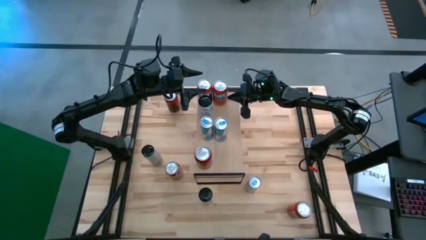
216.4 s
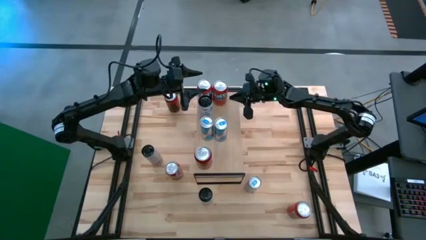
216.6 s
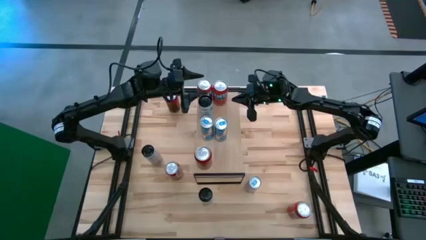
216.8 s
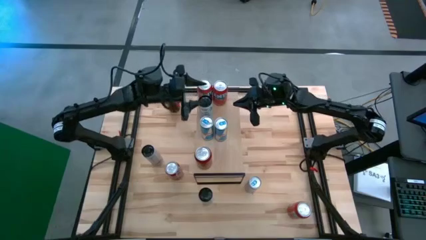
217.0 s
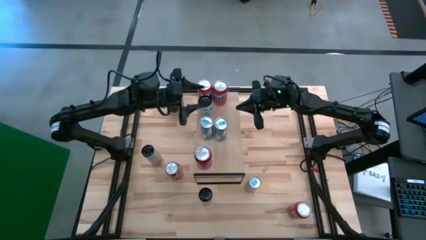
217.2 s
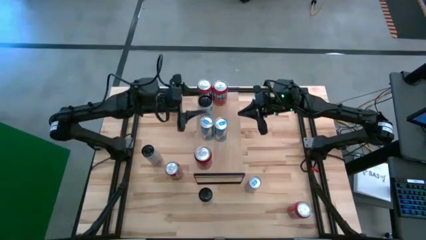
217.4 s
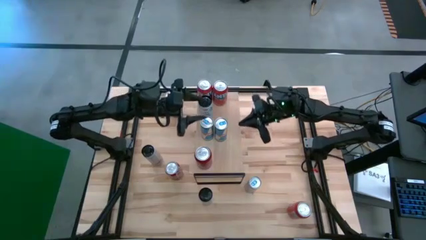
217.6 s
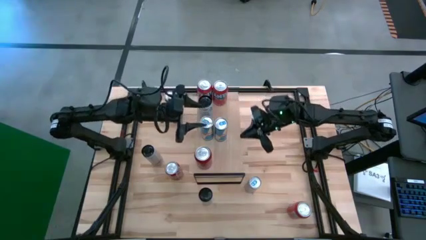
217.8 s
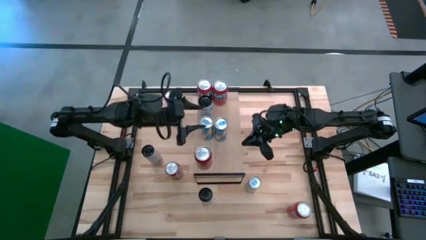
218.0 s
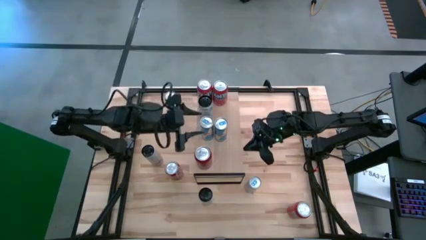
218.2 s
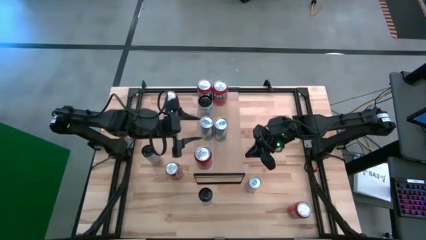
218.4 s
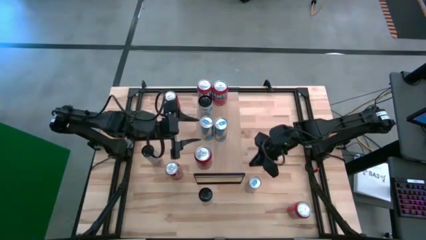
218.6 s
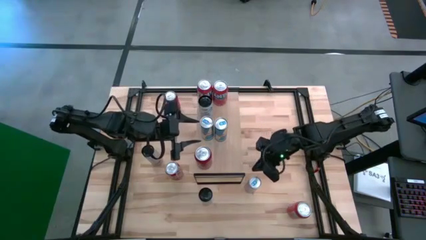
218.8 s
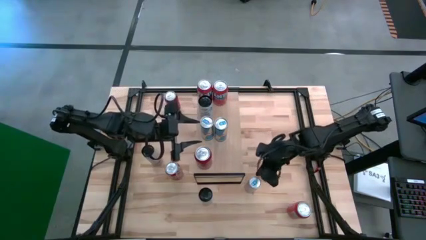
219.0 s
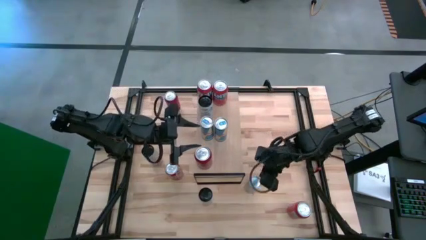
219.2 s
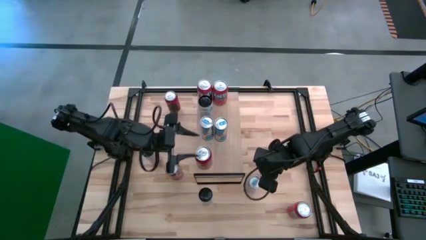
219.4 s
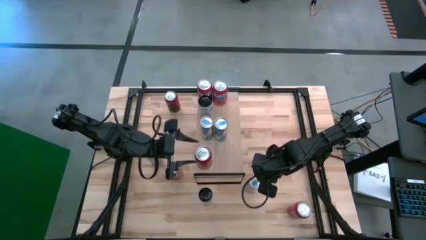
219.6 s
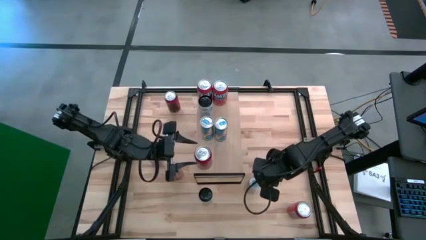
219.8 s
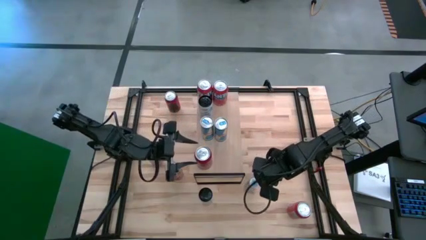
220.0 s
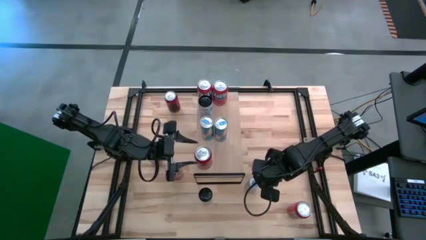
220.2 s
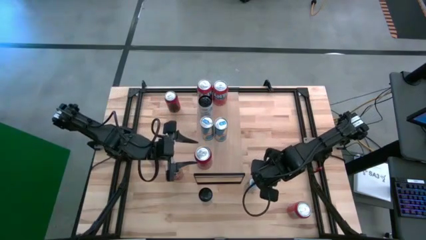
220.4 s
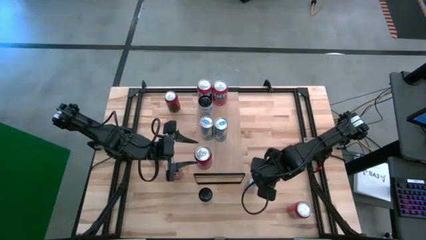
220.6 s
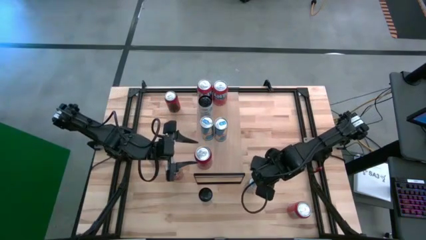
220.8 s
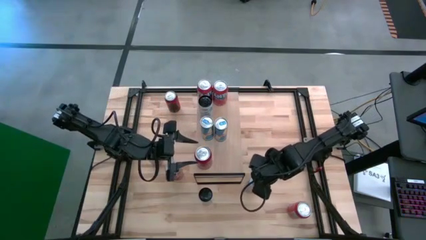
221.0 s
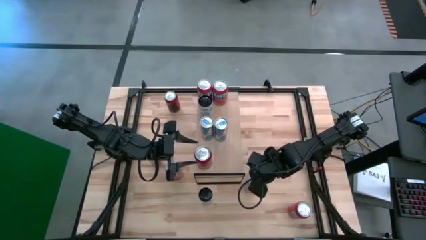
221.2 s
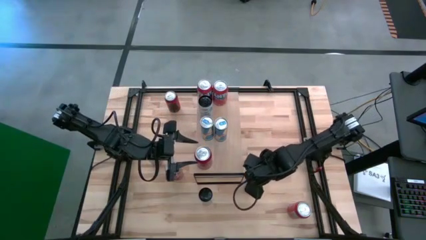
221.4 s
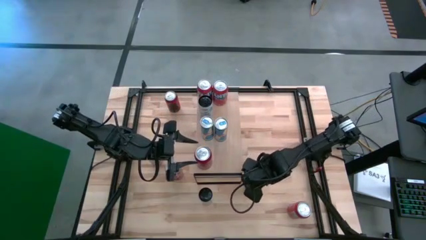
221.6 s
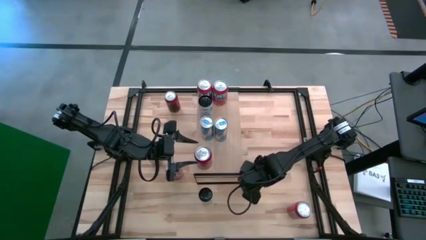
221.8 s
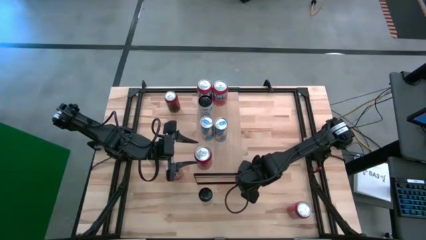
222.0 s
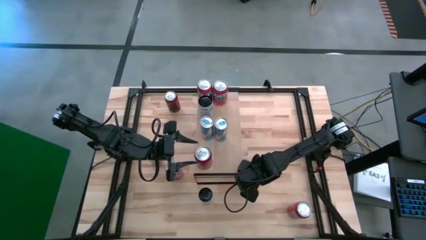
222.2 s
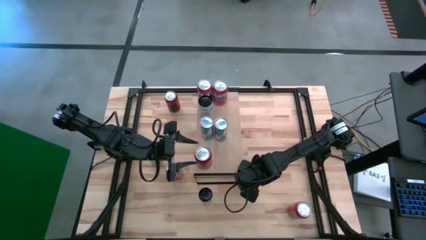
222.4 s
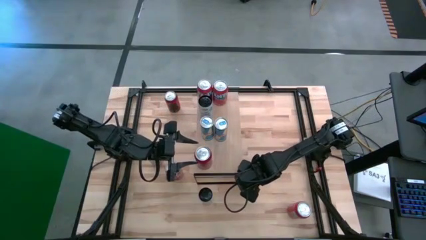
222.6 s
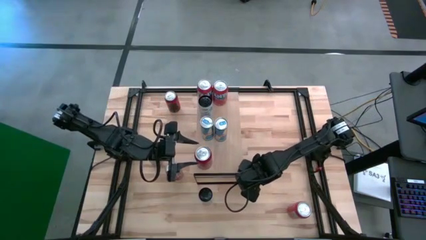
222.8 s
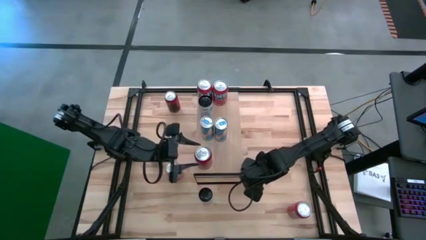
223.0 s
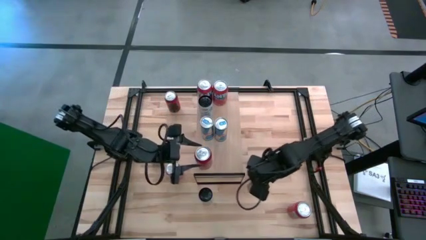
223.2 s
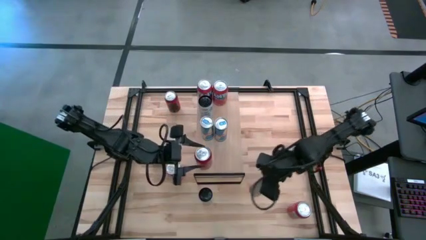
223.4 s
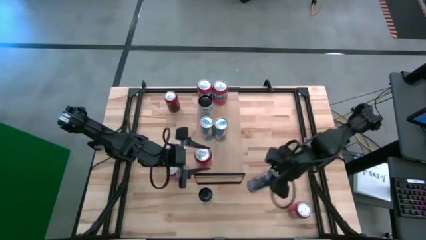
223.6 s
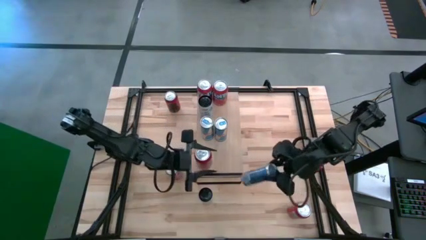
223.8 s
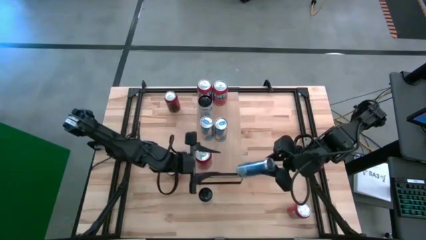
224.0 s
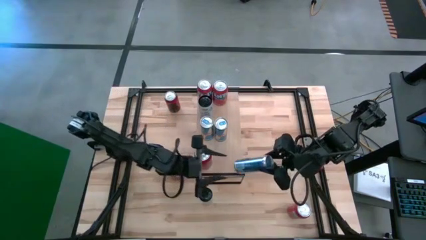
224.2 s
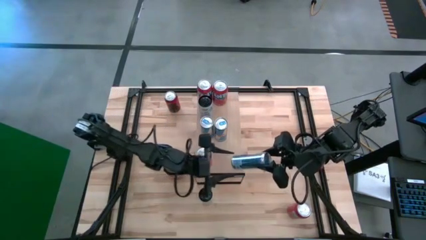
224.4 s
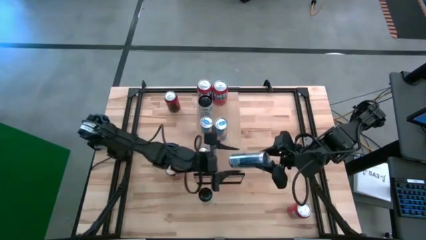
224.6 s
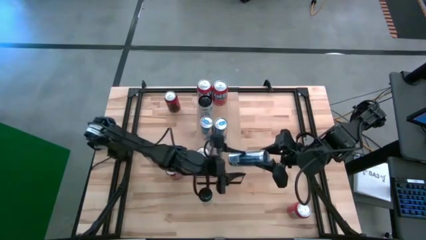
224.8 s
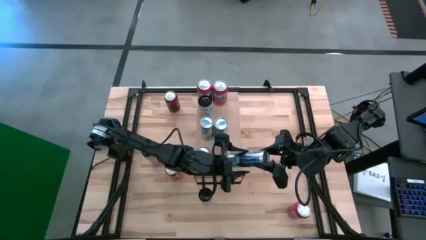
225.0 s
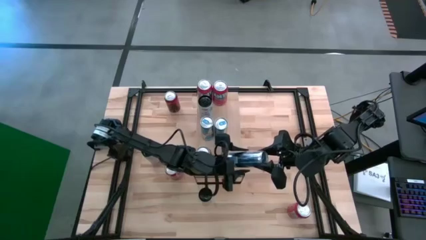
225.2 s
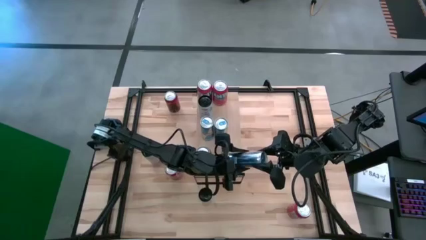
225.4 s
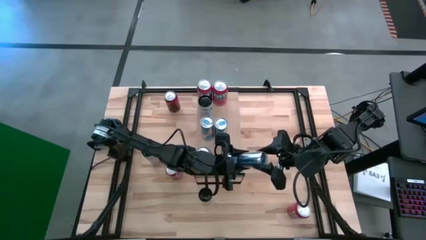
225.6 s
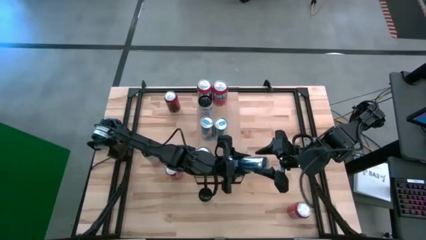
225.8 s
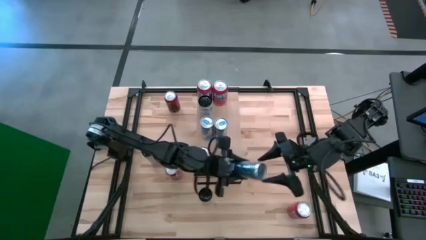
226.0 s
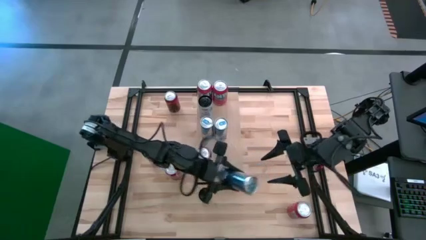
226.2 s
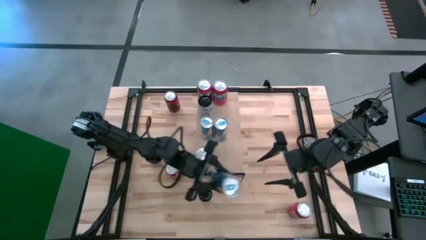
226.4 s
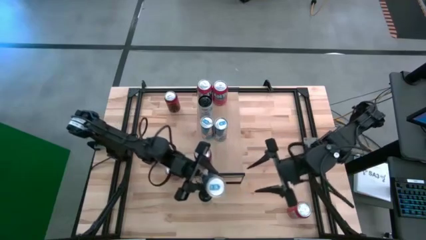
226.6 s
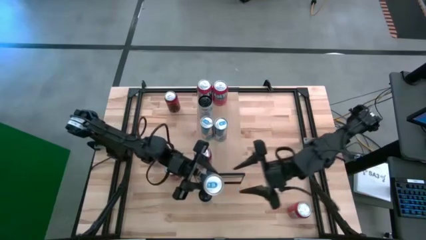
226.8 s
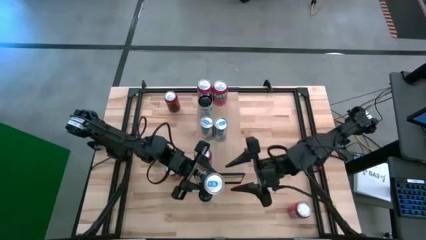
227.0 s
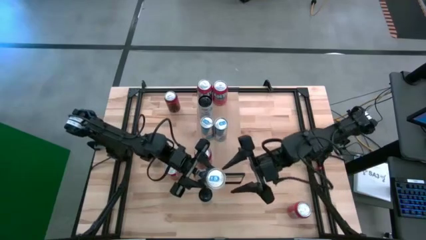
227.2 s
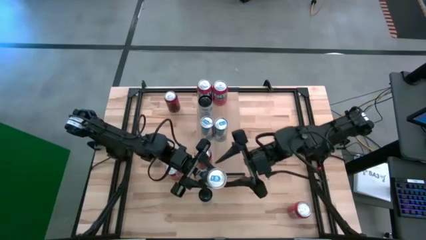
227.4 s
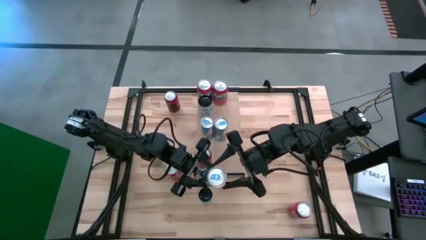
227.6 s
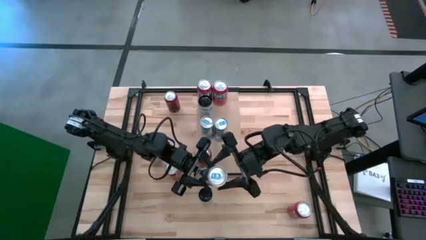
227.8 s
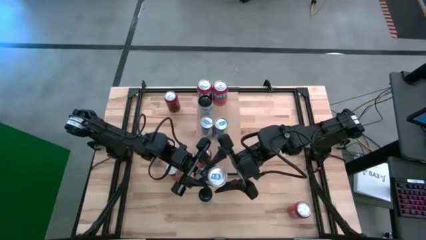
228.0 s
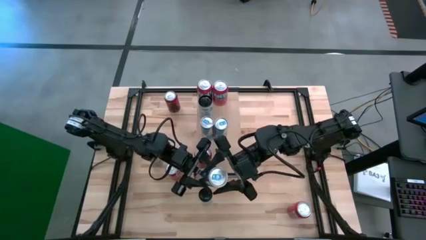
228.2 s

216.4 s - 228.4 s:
Task: Place canned beverage on shelf
Put the blue soda can on the shelf aligned with the other blue soda cans
